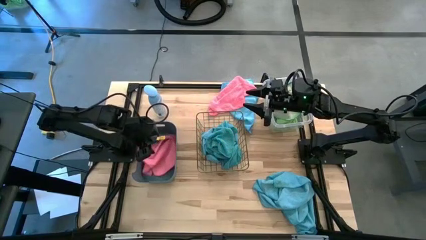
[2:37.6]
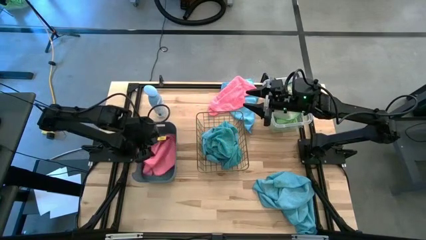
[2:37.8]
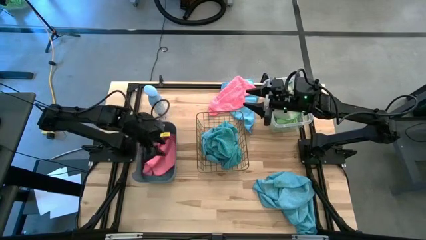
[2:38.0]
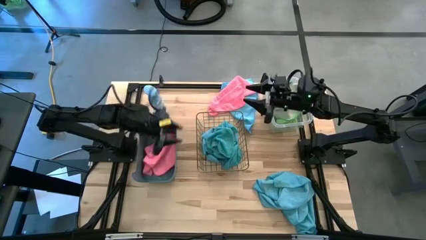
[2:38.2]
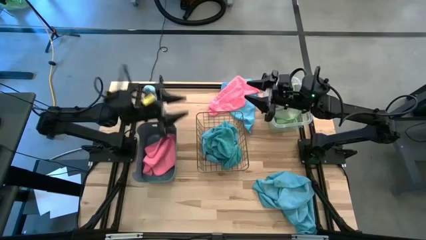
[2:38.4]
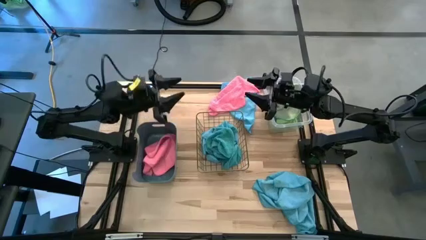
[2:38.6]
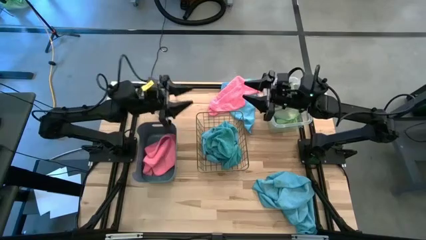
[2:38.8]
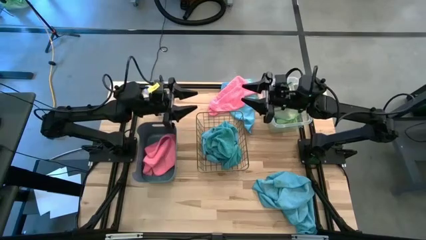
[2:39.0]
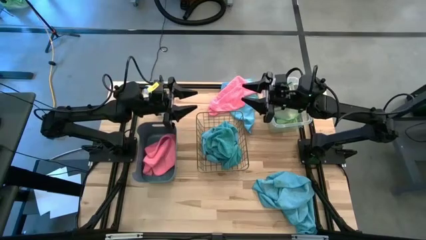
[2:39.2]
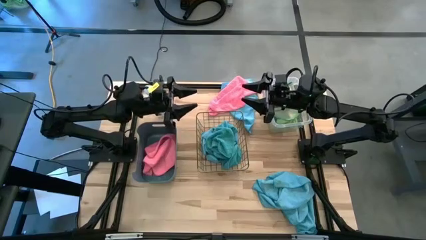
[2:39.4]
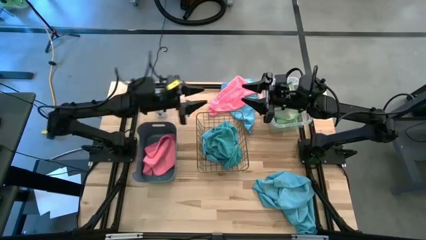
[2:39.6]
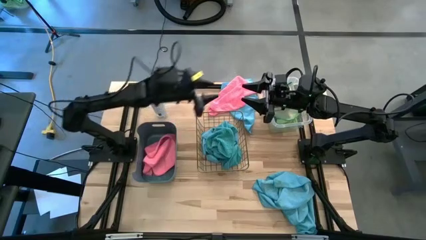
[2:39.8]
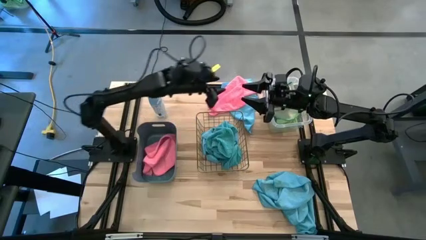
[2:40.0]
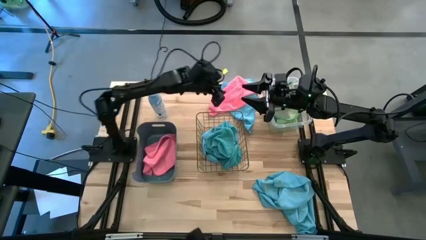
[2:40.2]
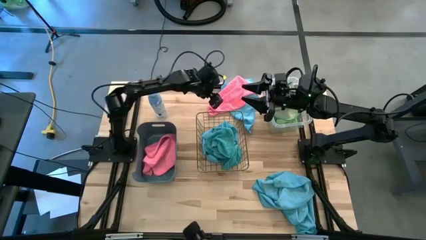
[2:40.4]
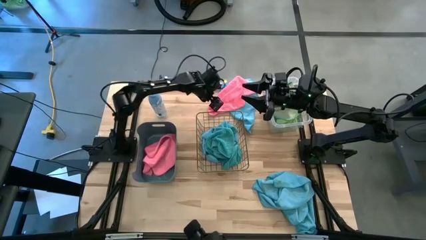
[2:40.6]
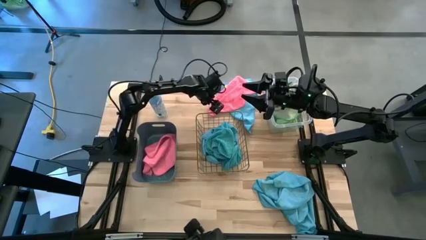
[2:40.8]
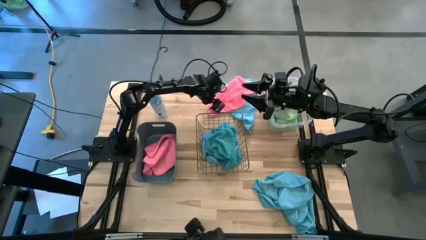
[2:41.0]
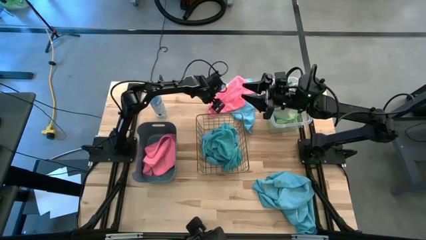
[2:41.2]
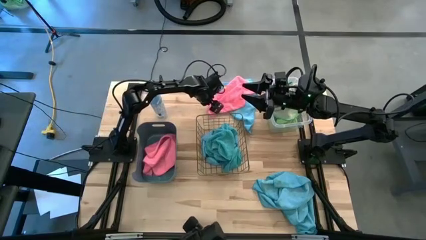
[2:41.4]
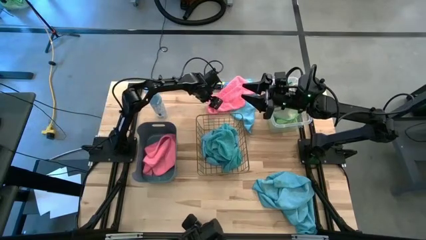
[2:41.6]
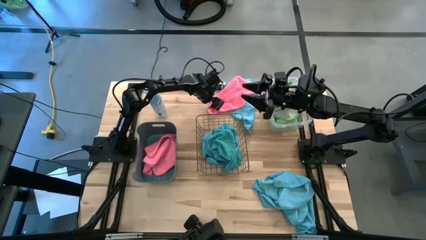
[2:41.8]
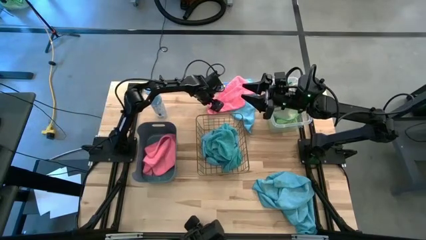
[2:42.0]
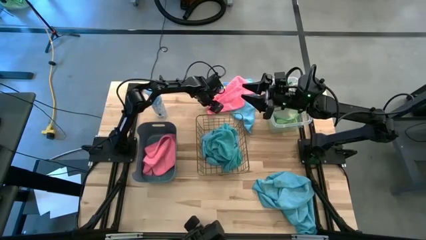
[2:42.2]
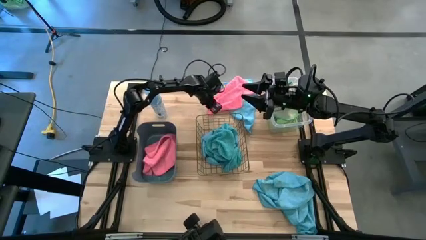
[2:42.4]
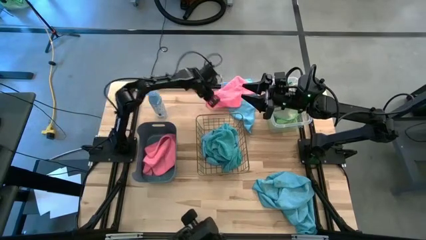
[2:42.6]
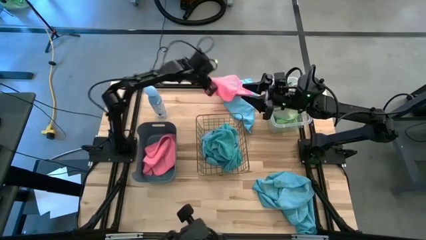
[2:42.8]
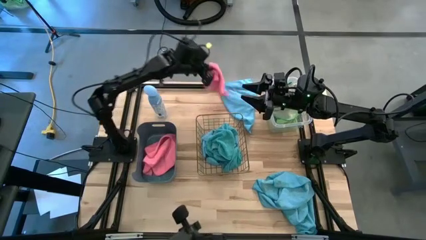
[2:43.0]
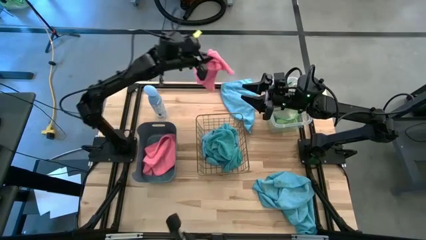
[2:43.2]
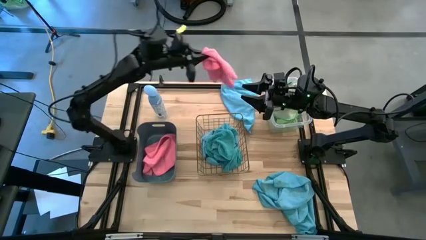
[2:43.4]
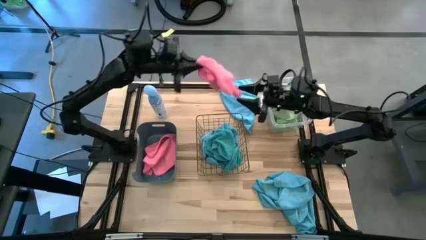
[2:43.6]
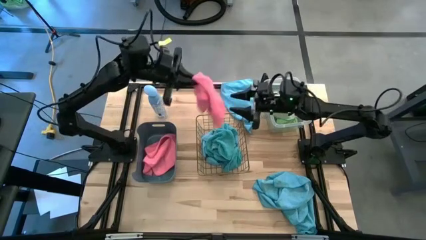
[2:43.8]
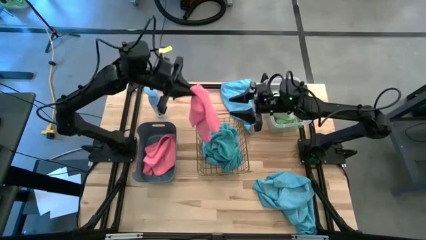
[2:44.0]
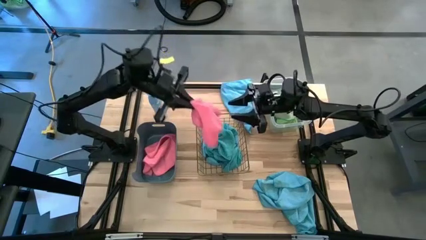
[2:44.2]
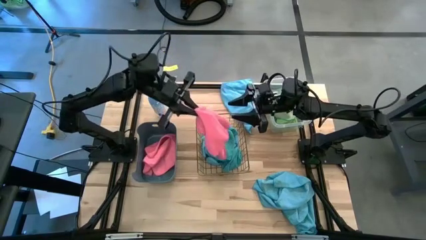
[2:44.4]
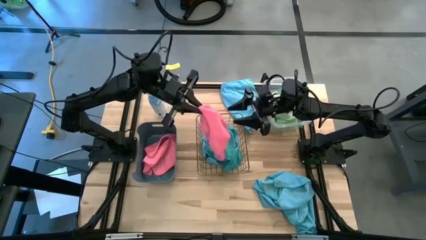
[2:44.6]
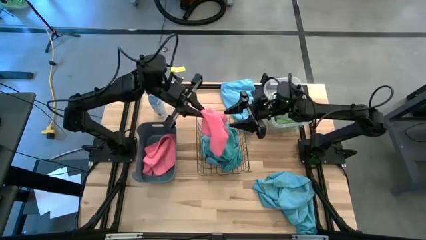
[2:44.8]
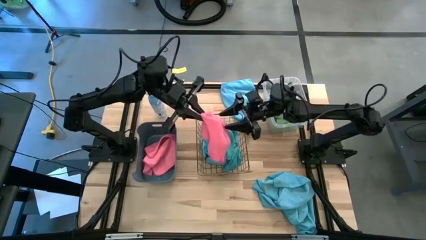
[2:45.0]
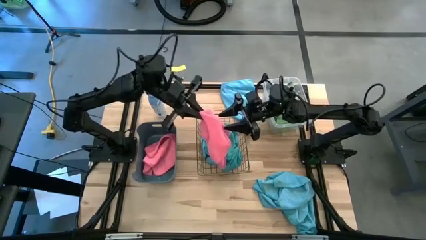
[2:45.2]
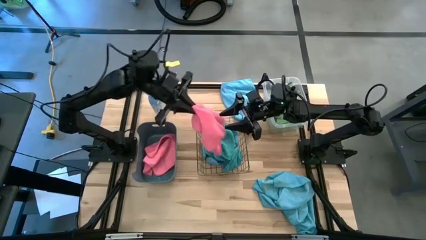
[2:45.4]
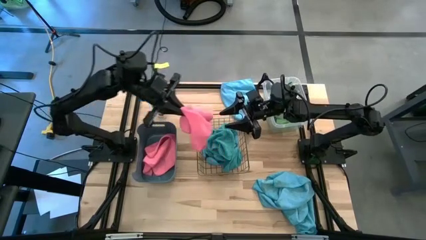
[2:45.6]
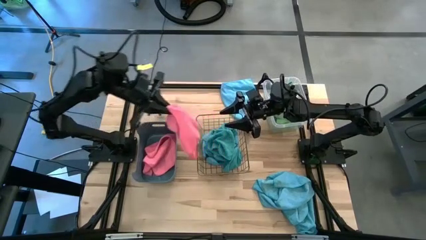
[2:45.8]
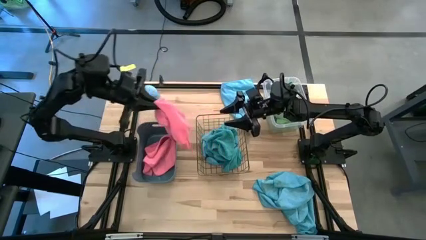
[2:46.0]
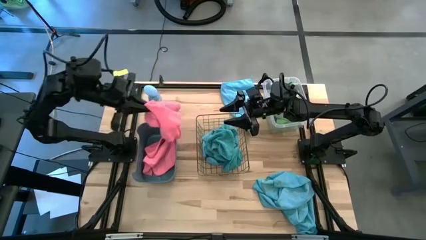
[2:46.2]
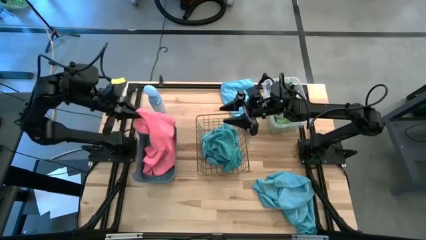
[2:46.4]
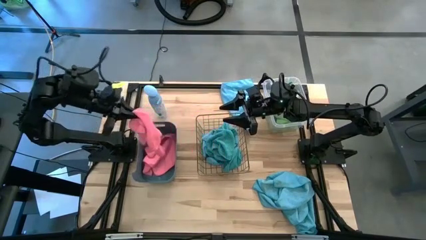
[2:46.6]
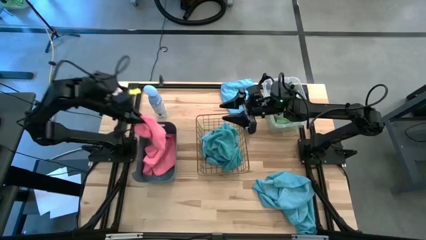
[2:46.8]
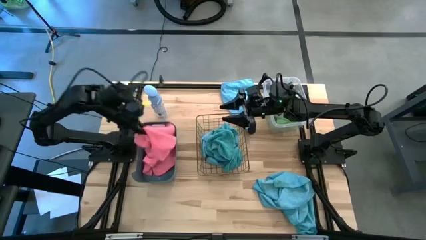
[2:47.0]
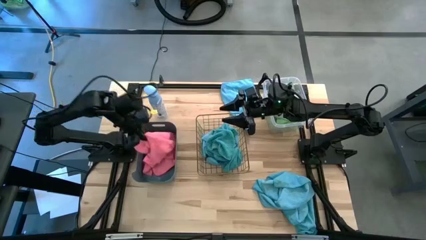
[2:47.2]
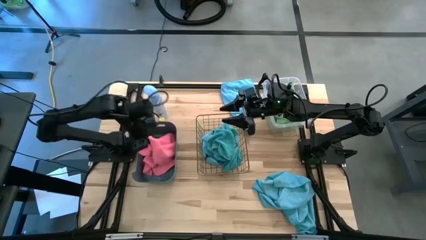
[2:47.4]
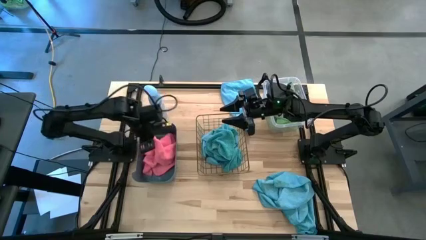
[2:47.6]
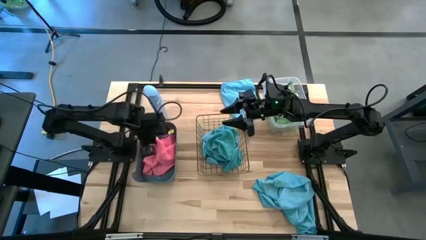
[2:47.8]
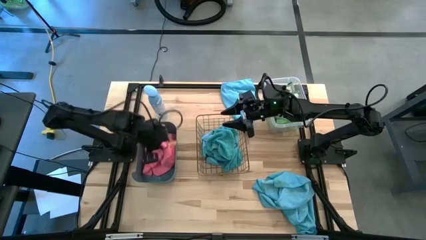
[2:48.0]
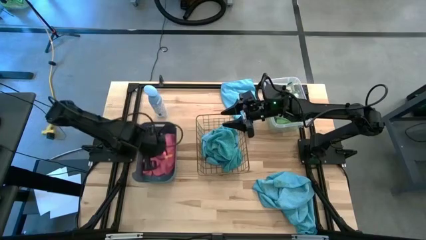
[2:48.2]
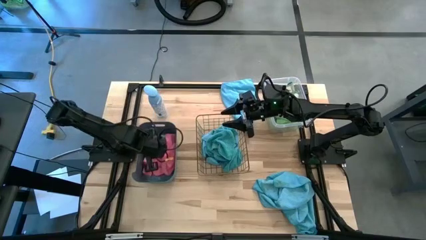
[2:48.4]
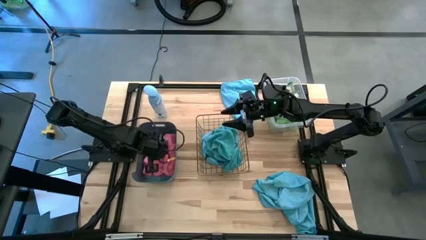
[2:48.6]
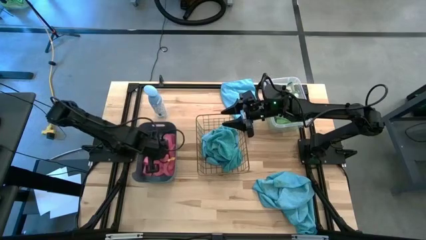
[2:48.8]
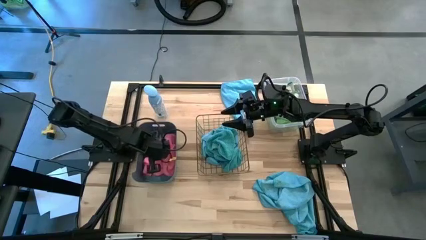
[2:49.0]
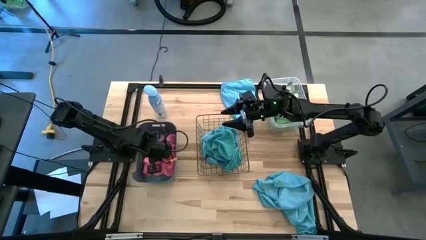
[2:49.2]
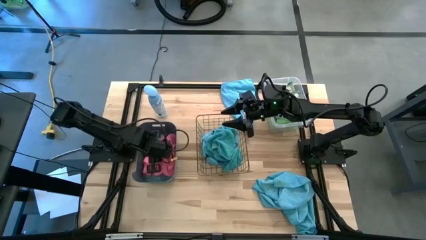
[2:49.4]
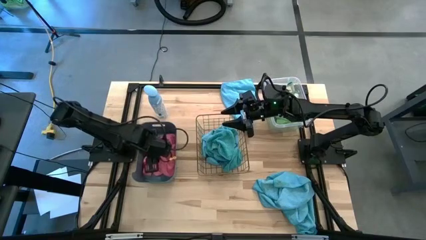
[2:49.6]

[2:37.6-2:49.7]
Task: Sort microfiber towel by color & place in baskets
Put the pink towel into the blue bin
